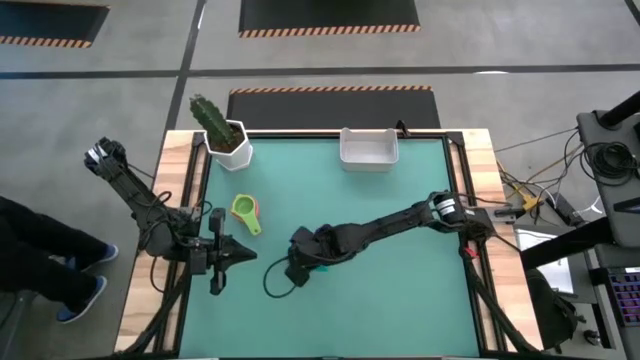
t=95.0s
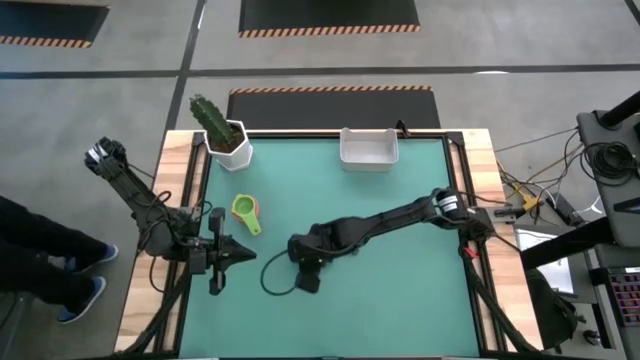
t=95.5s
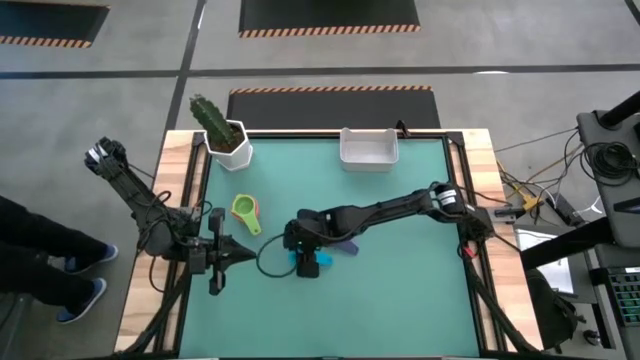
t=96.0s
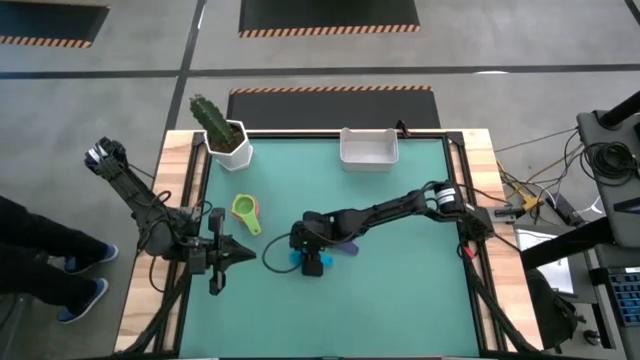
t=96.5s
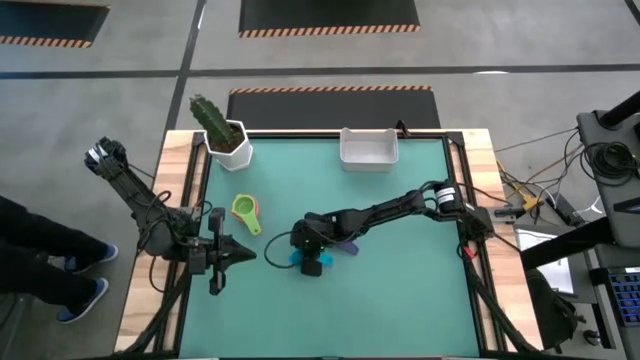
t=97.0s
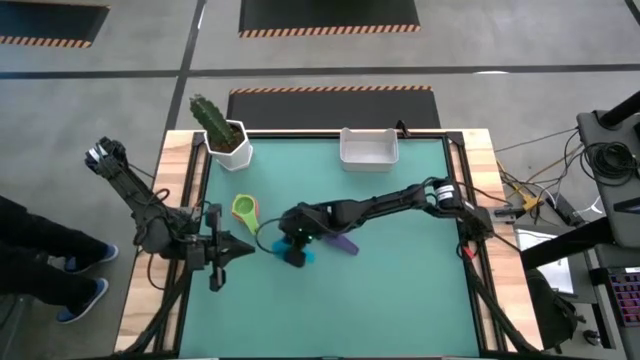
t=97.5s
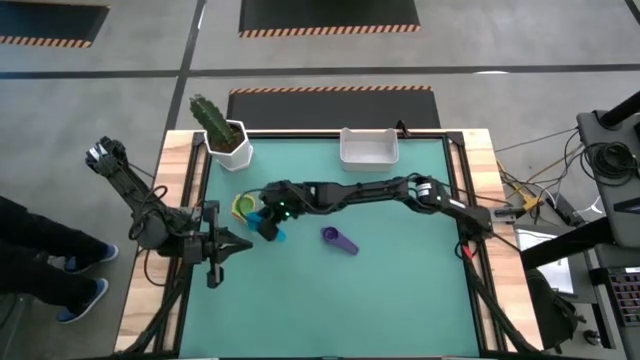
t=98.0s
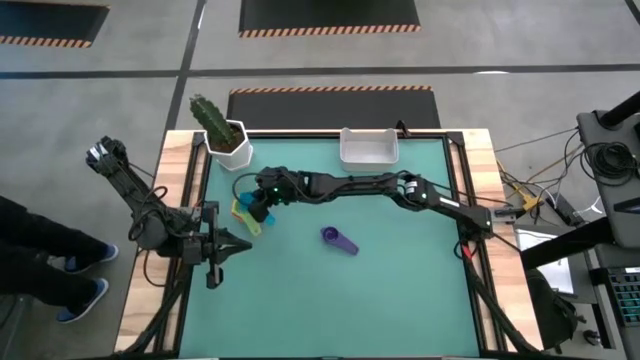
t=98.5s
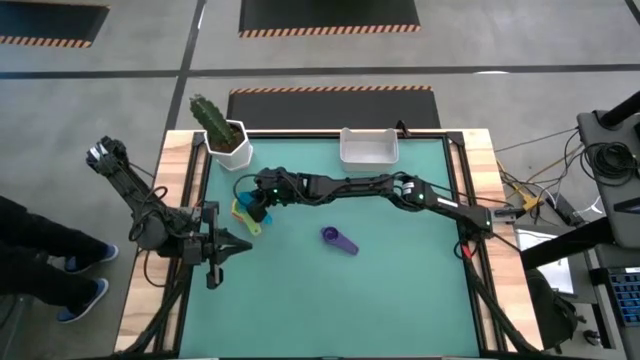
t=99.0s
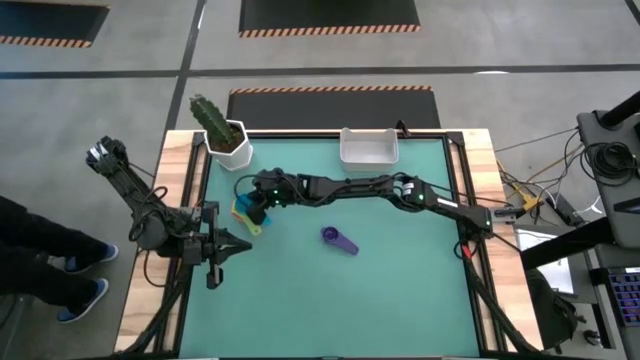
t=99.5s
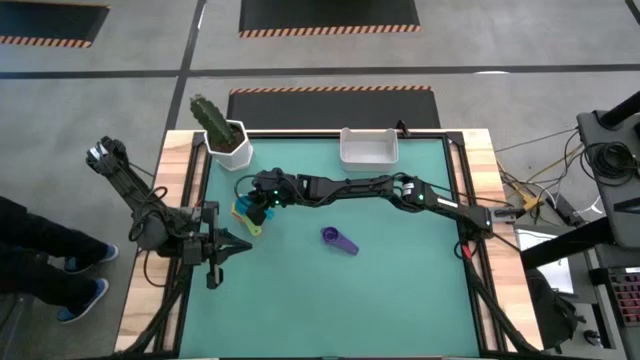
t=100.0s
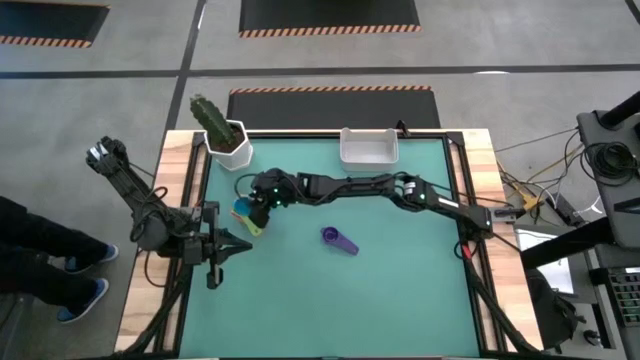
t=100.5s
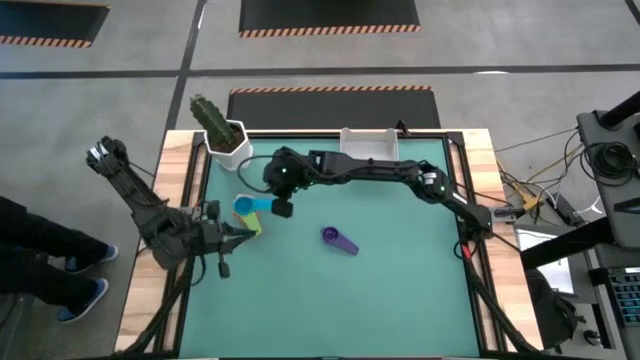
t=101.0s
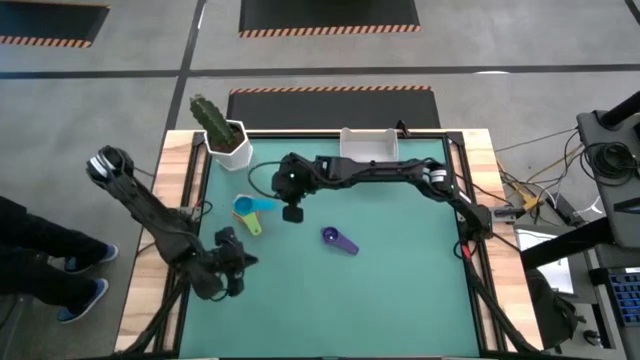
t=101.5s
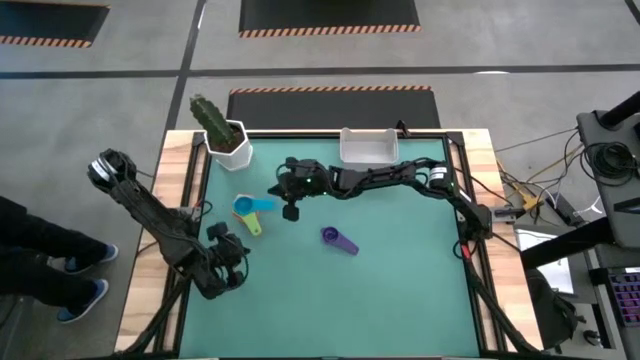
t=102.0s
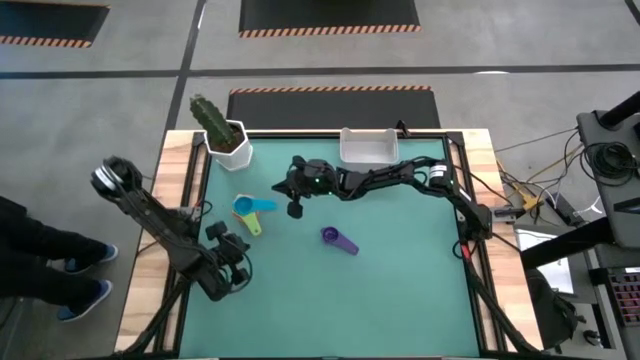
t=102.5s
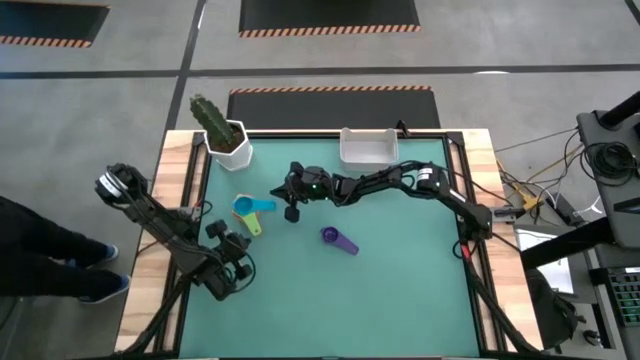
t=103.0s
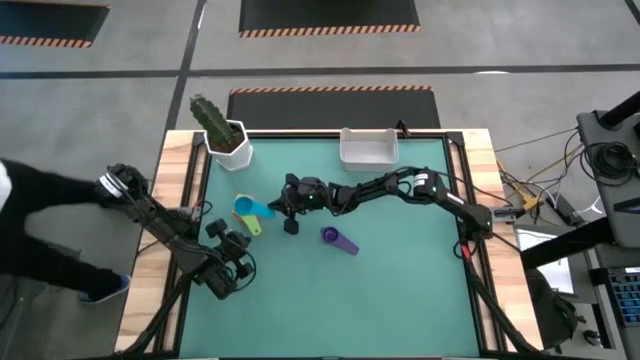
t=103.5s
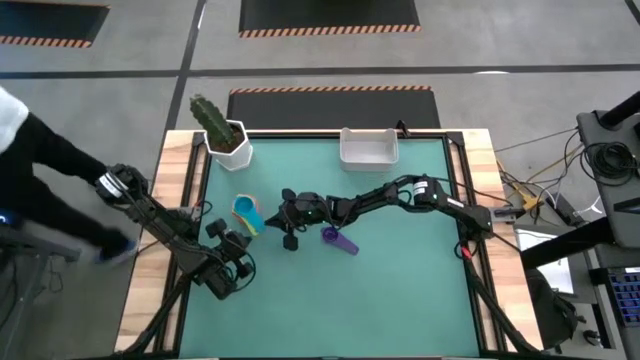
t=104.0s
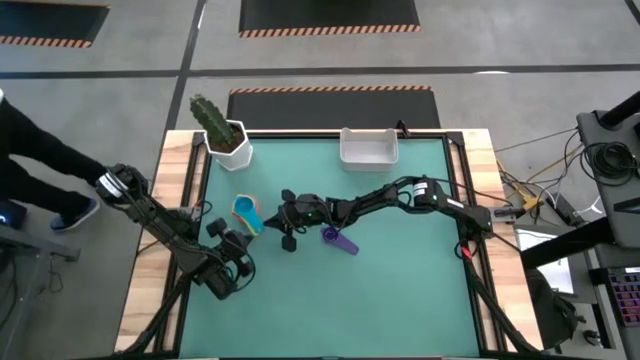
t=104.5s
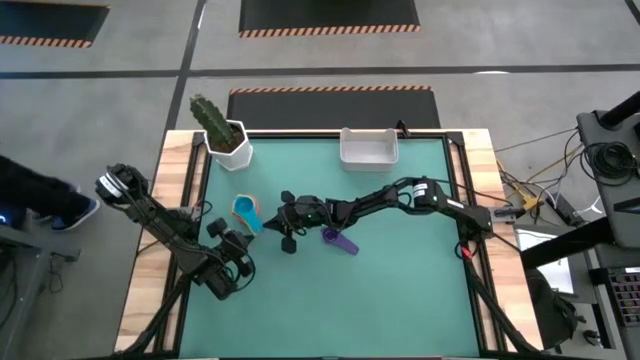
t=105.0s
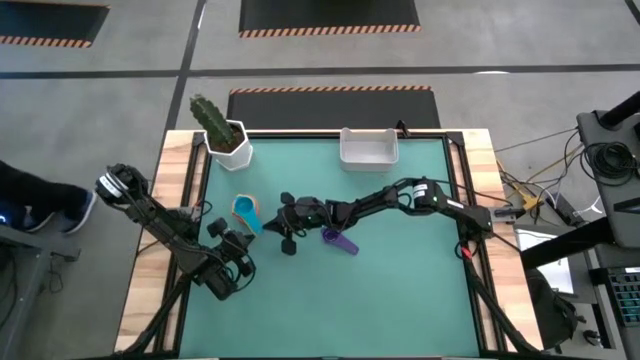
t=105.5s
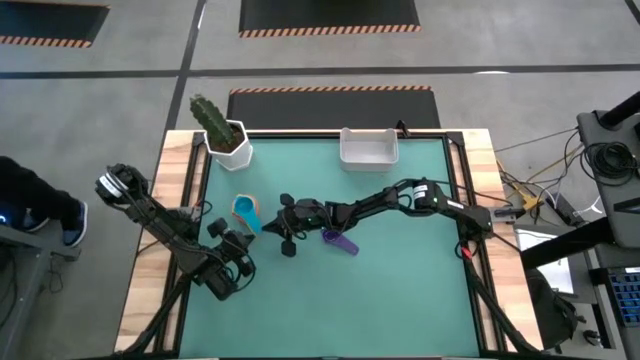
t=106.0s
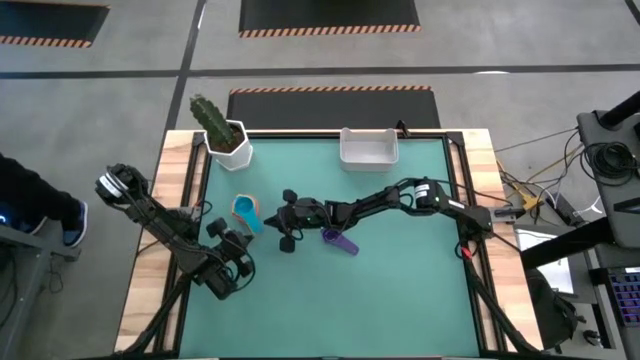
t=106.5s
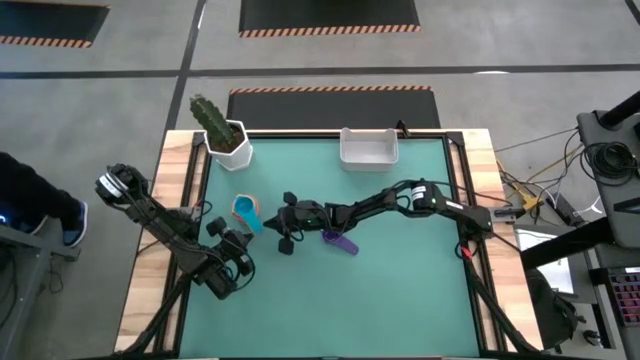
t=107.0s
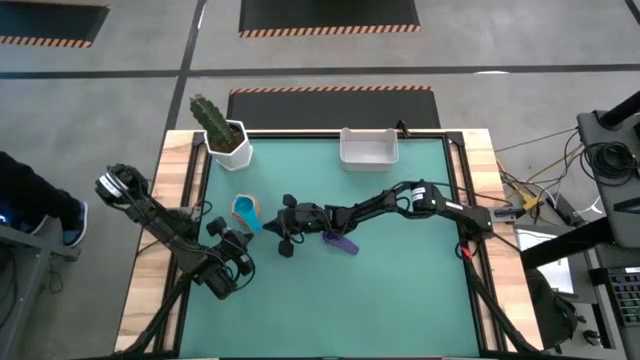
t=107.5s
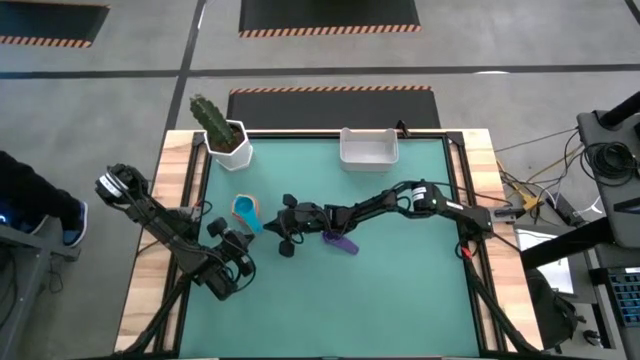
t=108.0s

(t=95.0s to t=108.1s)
Task: Nest measuring cups in basket
Stack the light blue measuring cup on top of the green measuring cup

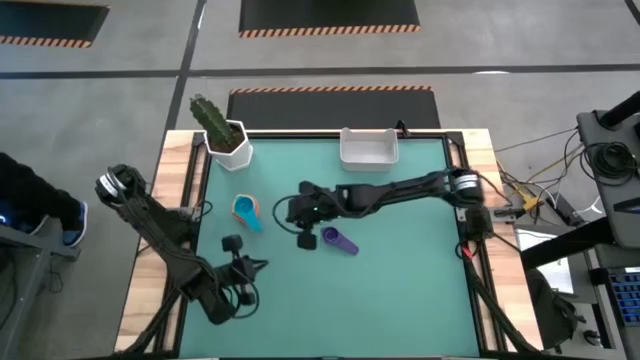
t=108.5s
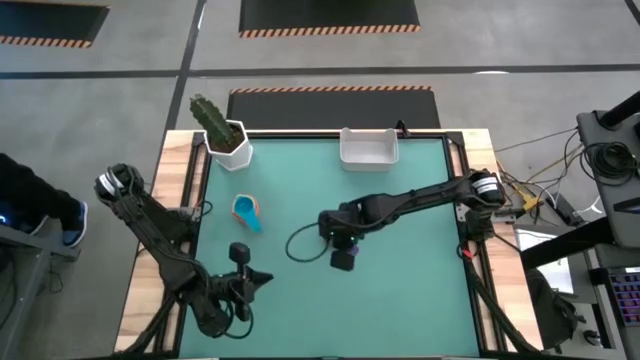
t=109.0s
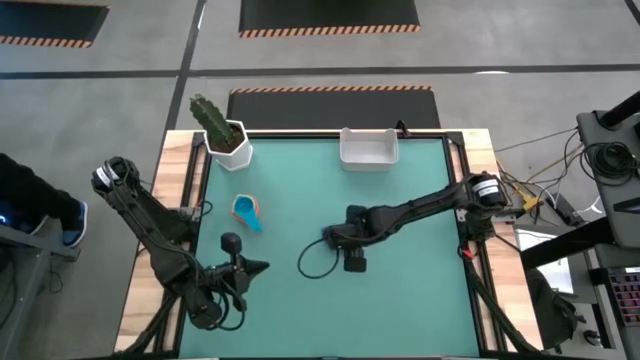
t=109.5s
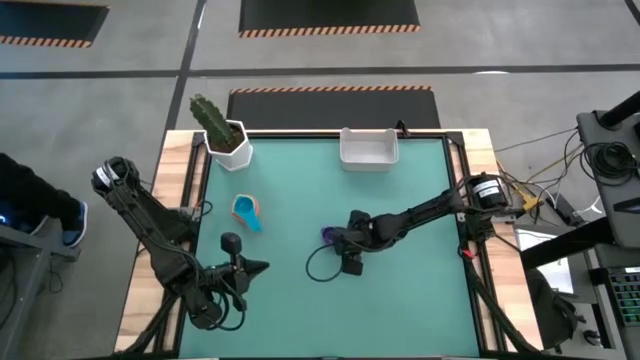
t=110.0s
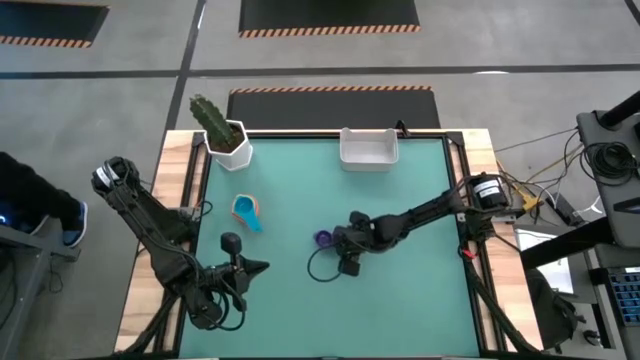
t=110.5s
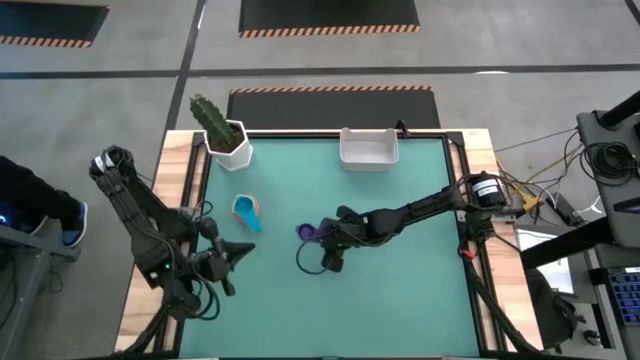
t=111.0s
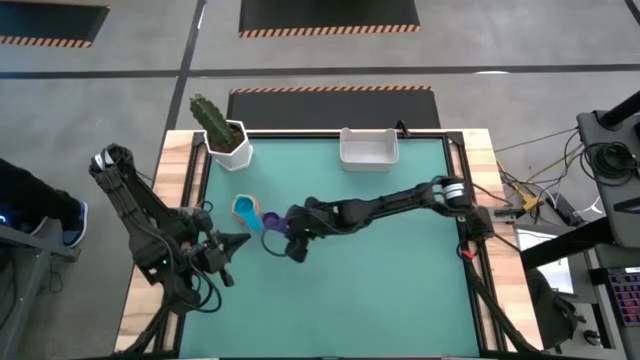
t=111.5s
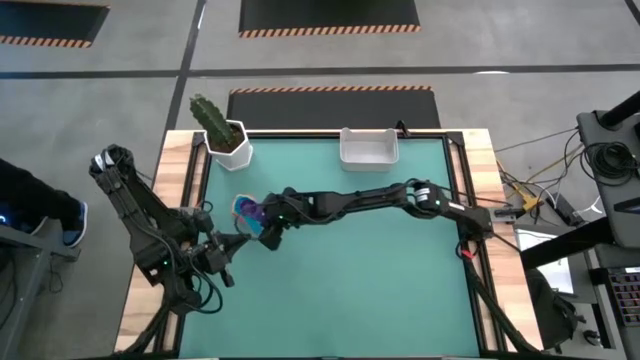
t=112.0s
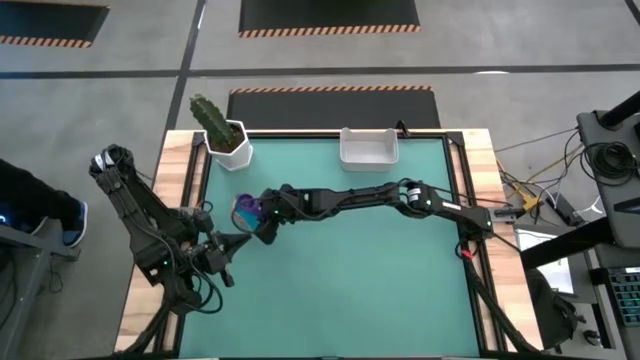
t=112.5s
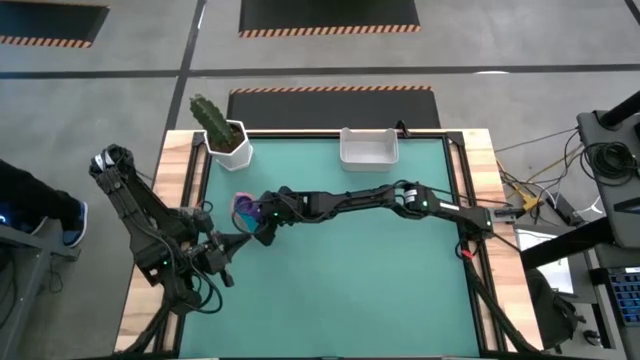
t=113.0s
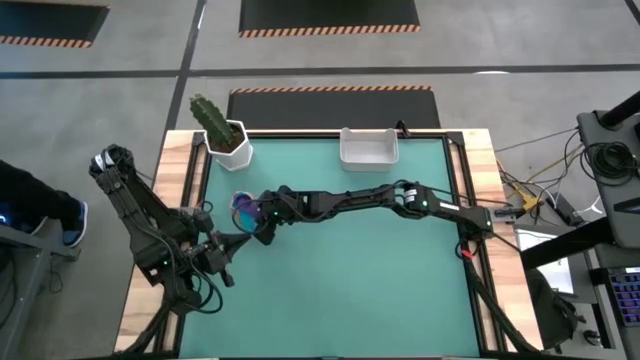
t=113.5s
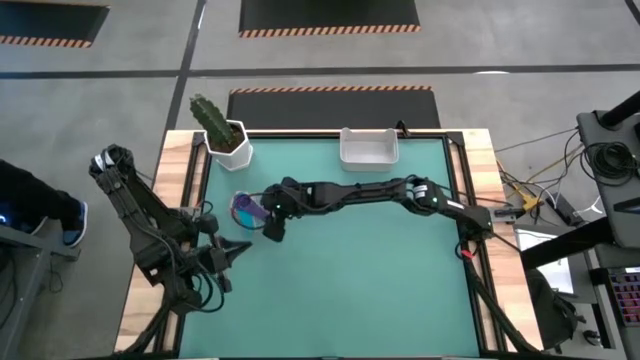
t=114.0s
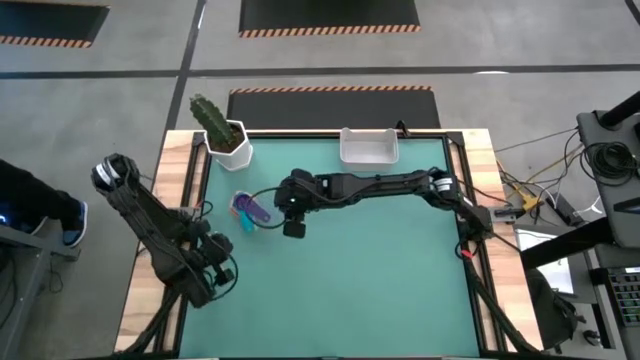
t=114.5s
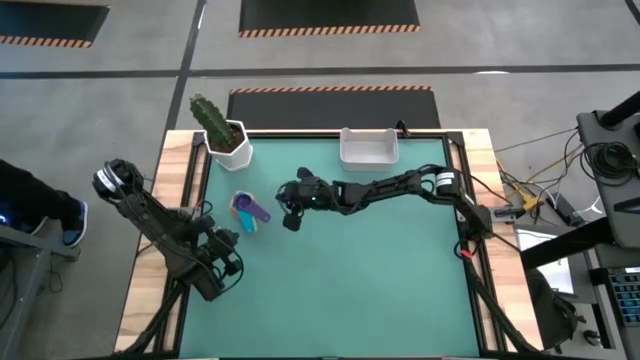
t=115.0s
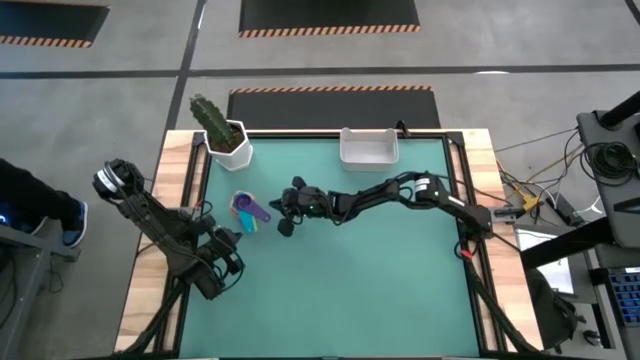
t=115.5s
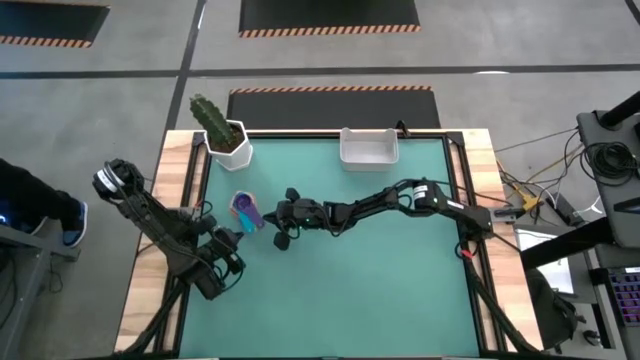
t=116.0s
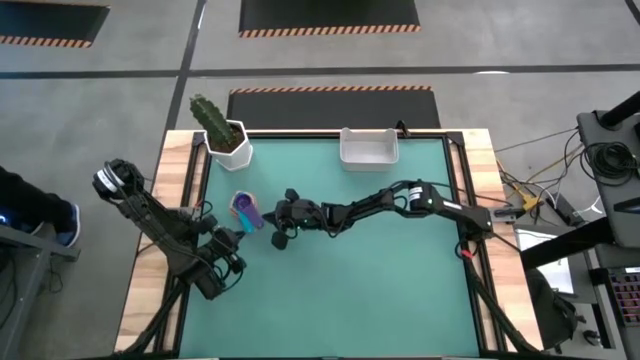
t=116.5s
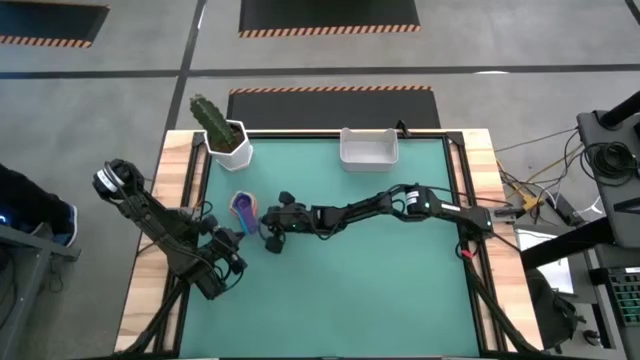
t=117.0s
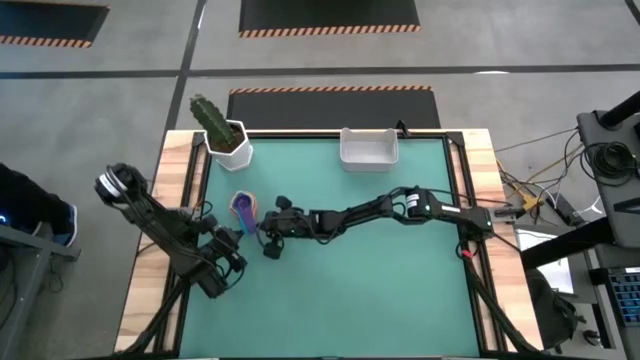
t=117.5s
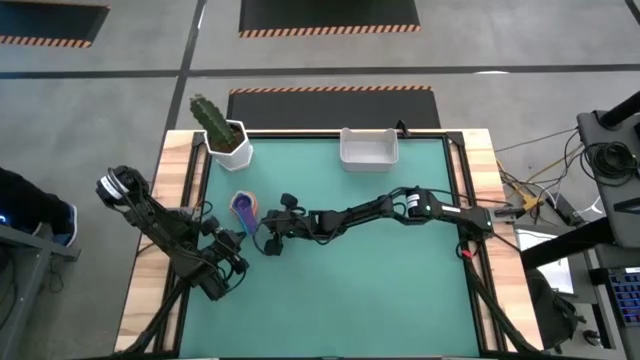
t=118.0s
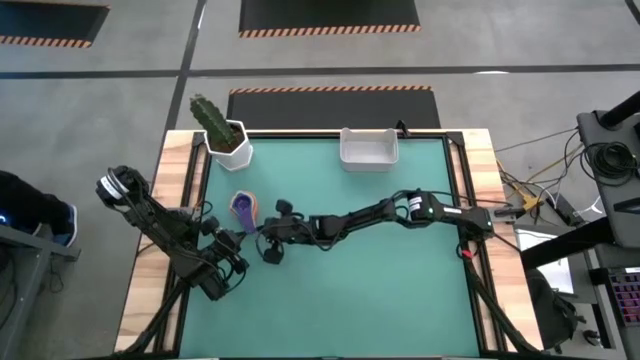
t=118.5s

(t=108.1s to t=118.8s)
Stack the purple measuring cup on top of the light blue measuring cup
